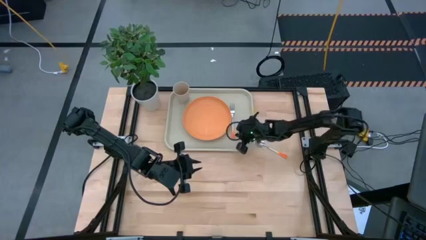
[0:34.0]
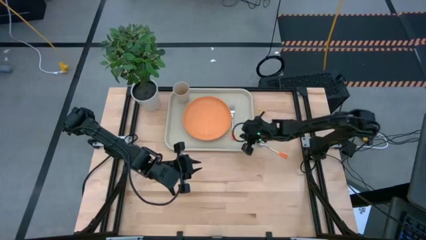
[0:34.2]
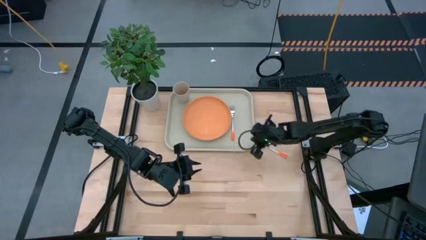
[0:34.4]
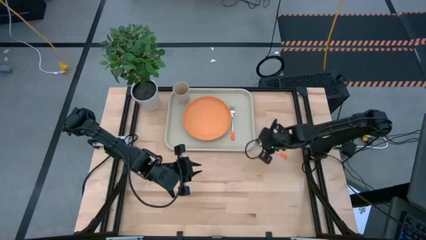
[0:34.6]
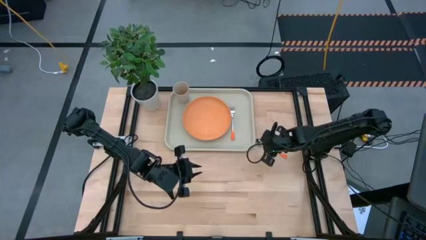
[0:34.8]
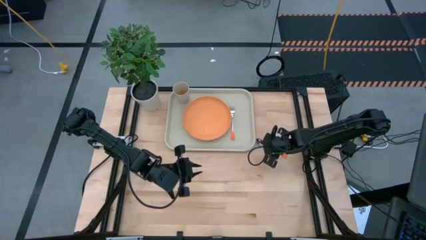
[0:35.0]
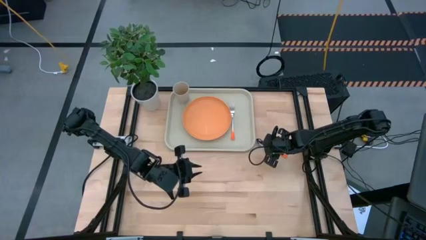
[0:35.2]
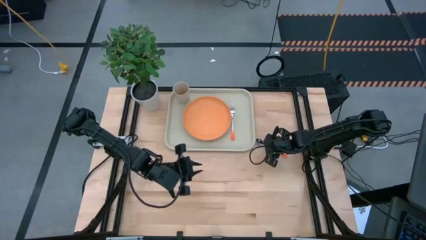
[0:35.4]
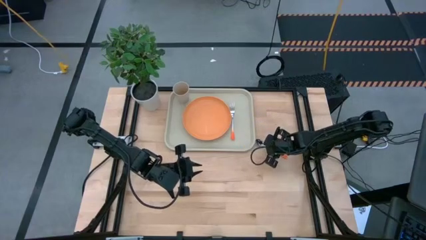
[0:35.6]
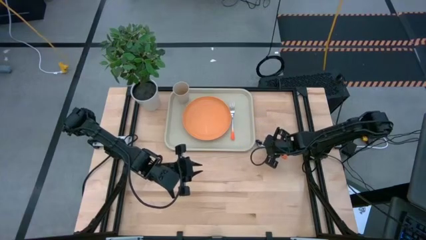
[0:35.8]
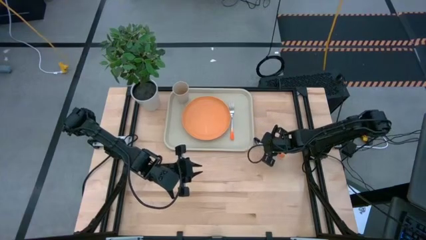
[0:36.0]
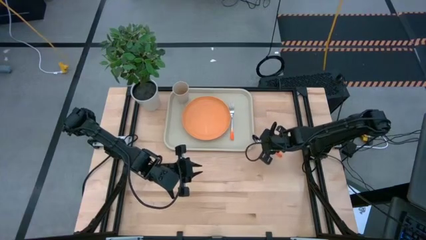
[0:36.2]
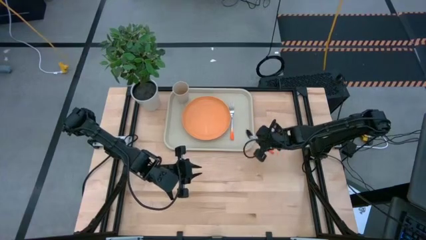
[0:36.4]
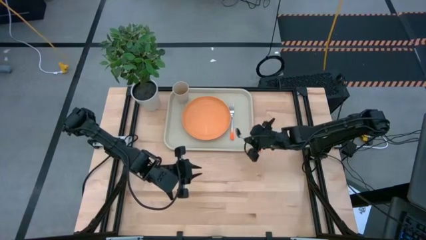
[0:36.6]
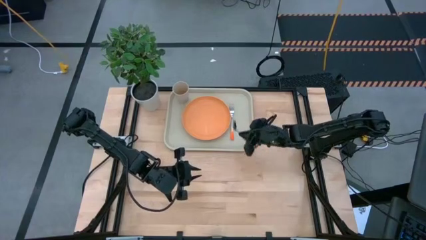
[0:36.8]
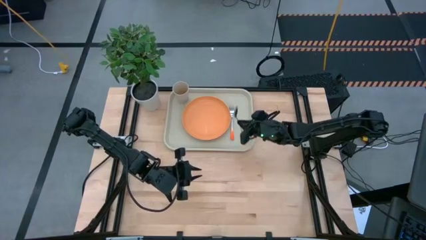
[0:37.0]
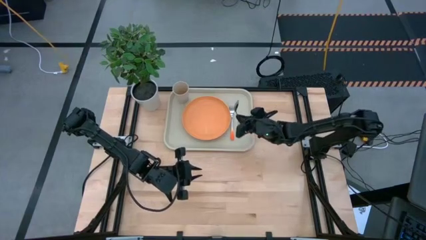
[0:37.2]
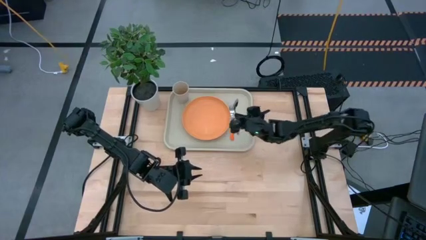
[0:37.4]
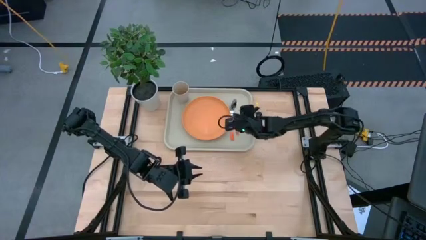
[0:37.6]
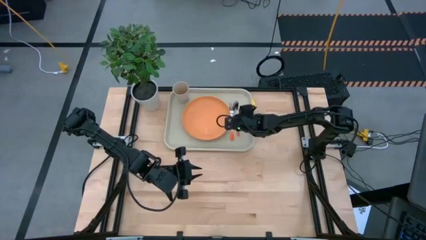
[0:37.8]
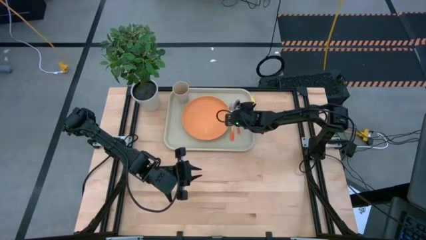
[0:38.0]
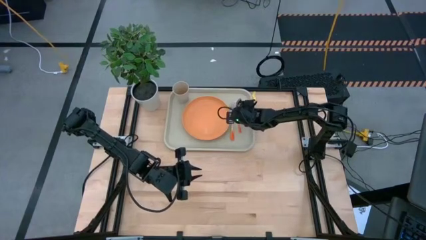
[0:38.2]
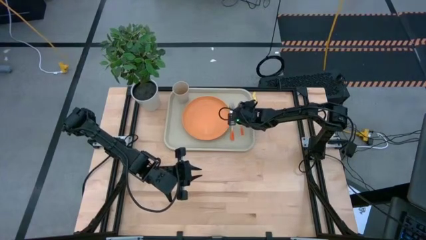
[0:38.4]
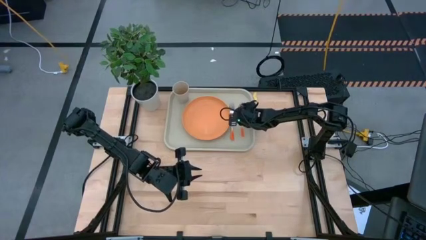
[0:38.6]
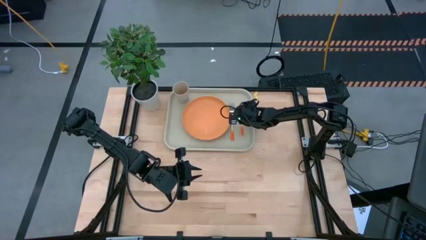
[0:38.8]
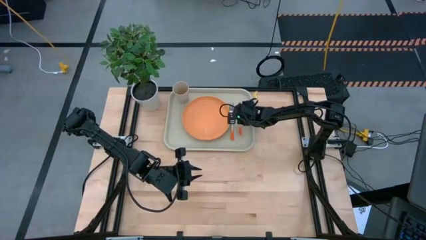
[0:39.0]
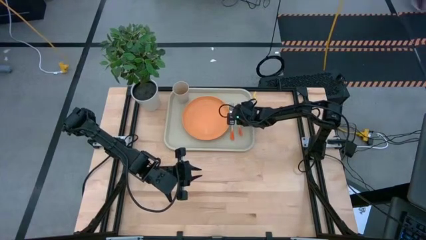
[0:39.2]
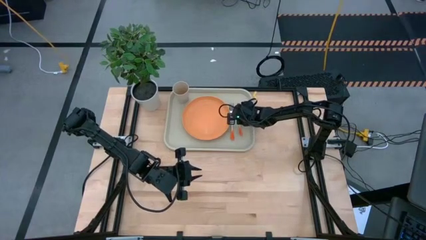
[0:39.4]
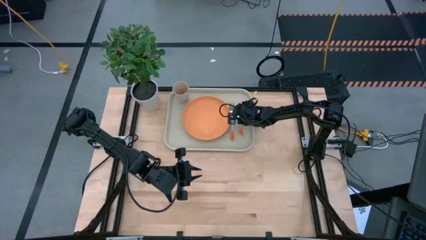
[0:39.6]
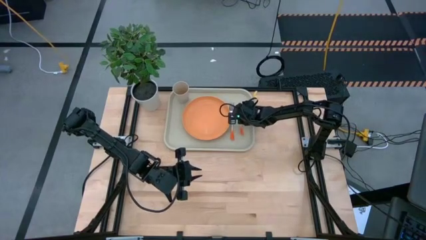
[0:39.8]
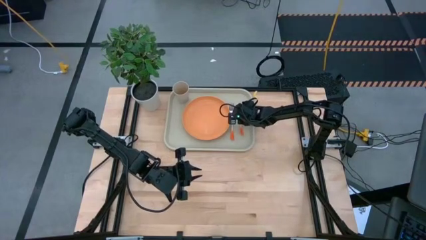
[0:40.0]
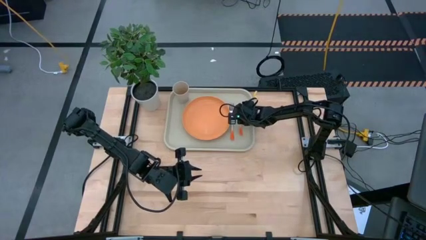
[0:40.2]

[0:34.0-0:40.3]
Task: Pick and place plate/cup/fork/spoon on tray
Put the orange spoon beside the orange fork on the brown tray

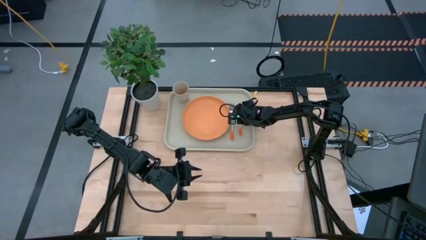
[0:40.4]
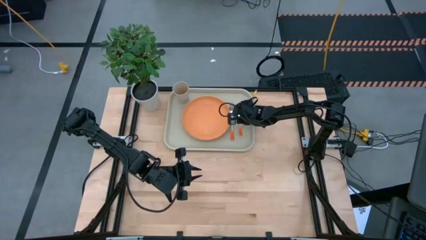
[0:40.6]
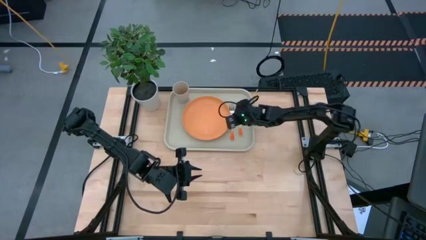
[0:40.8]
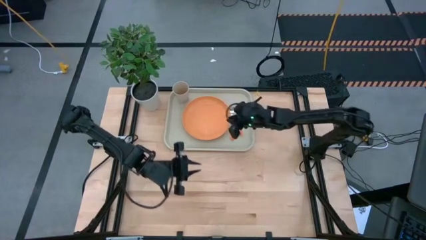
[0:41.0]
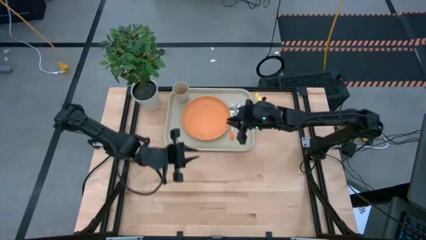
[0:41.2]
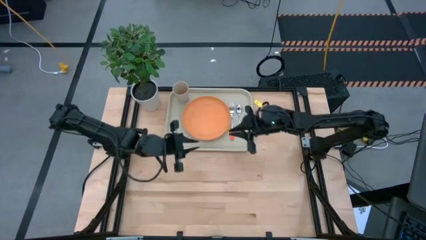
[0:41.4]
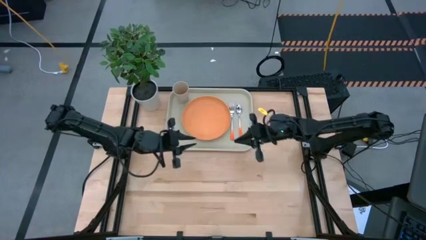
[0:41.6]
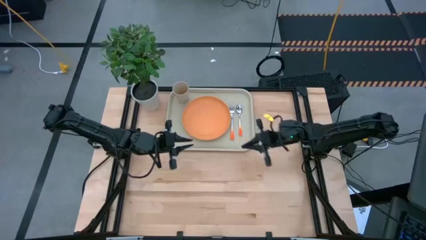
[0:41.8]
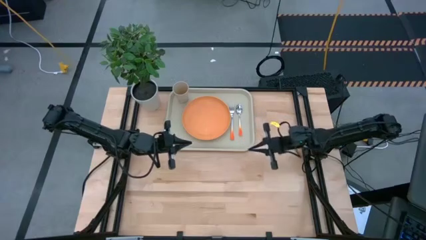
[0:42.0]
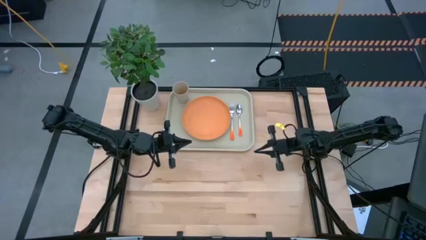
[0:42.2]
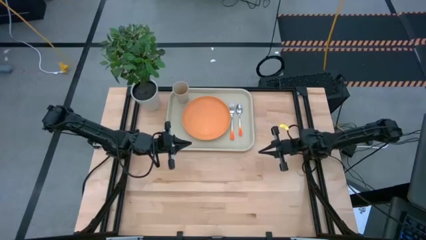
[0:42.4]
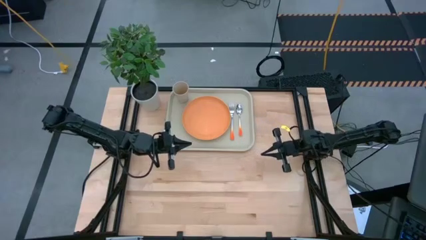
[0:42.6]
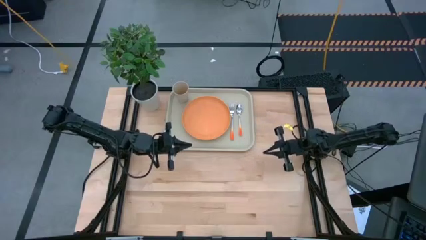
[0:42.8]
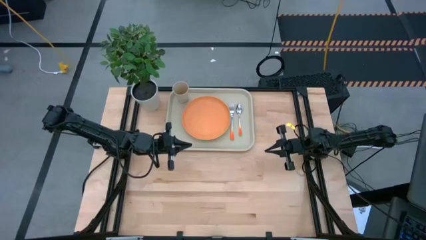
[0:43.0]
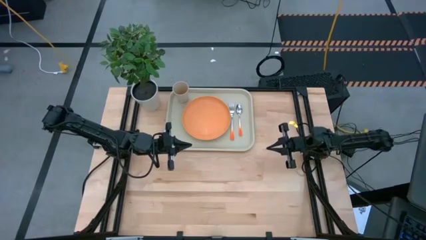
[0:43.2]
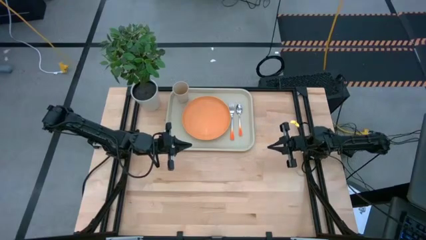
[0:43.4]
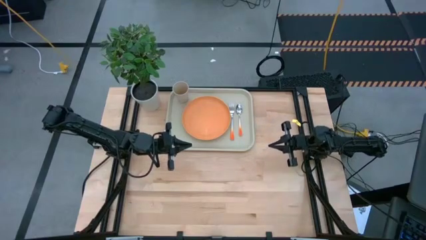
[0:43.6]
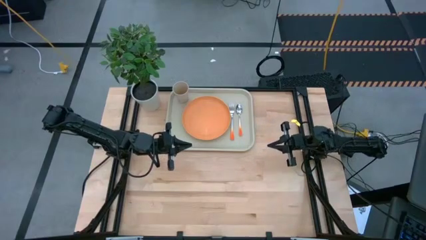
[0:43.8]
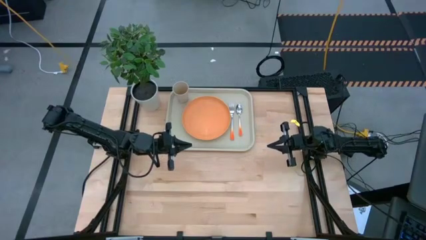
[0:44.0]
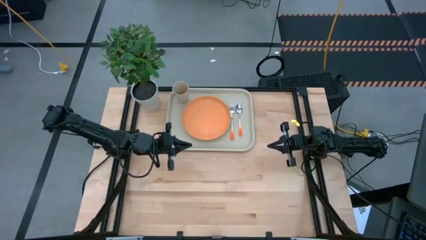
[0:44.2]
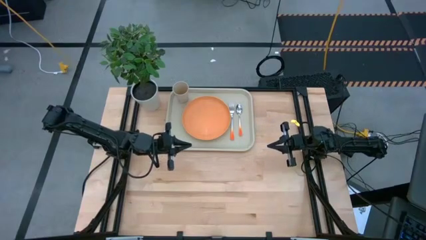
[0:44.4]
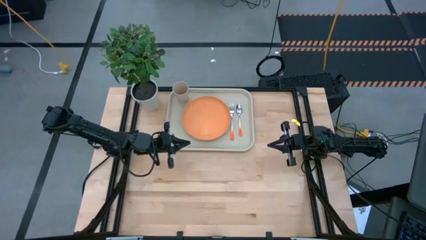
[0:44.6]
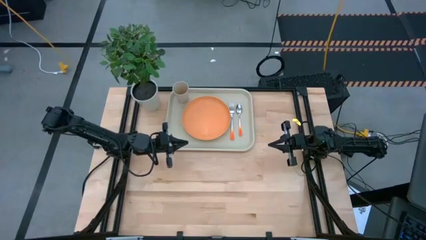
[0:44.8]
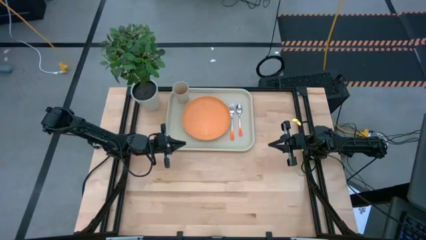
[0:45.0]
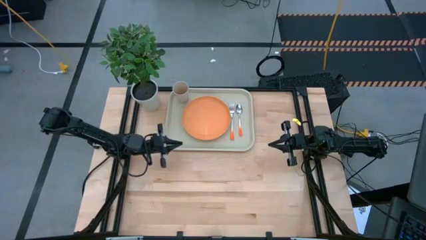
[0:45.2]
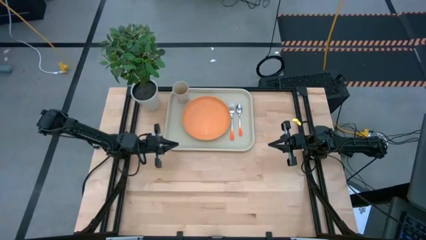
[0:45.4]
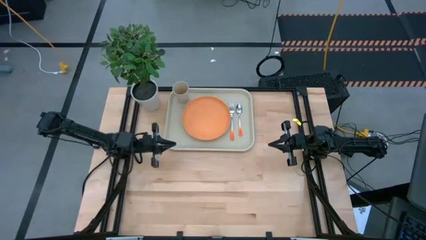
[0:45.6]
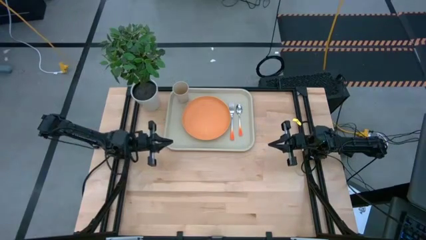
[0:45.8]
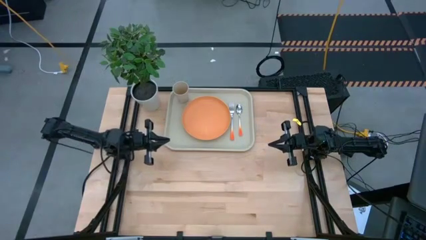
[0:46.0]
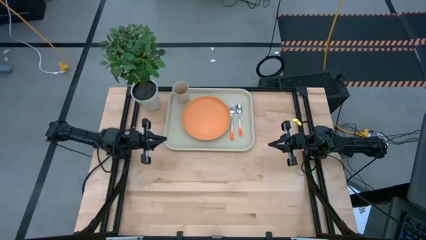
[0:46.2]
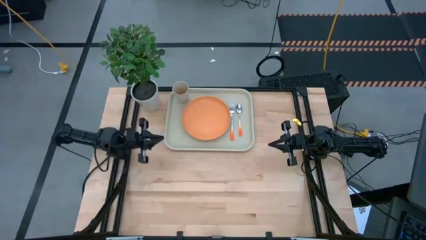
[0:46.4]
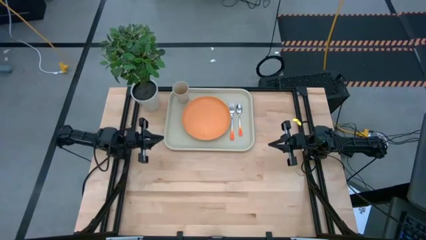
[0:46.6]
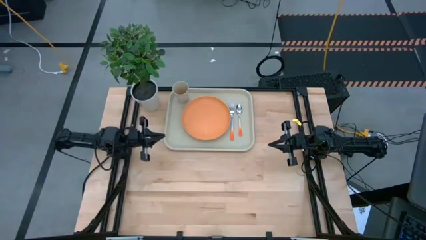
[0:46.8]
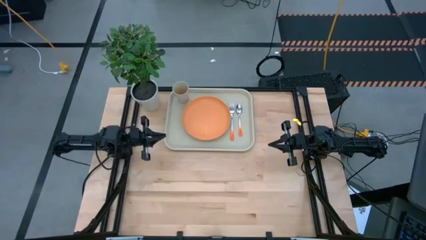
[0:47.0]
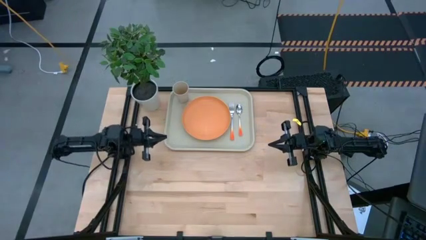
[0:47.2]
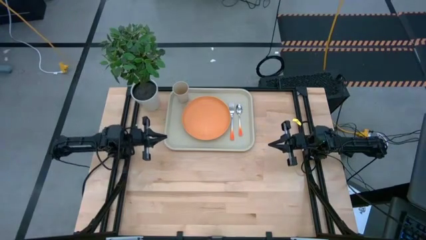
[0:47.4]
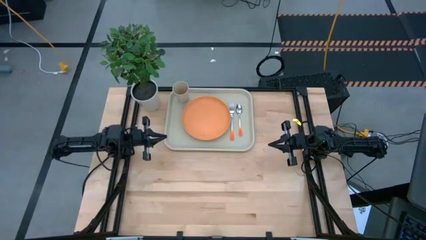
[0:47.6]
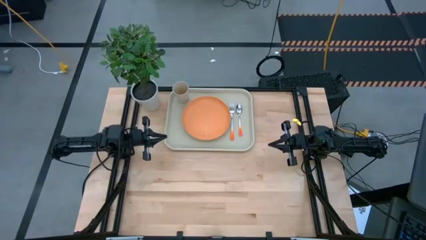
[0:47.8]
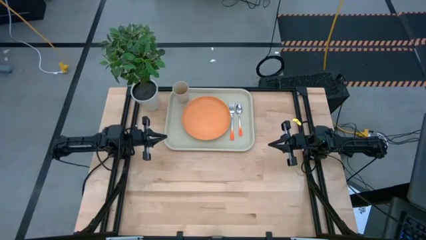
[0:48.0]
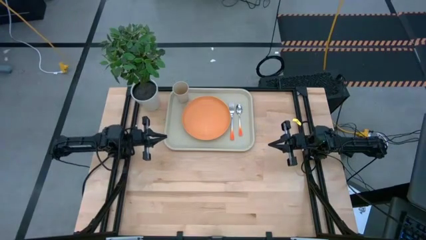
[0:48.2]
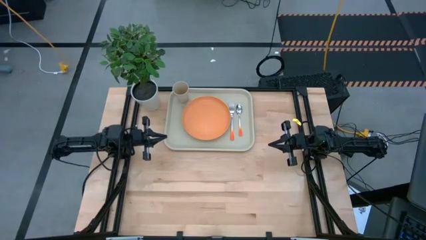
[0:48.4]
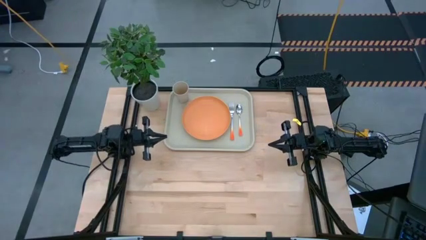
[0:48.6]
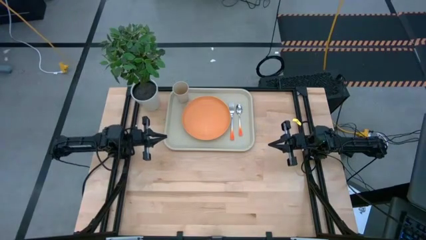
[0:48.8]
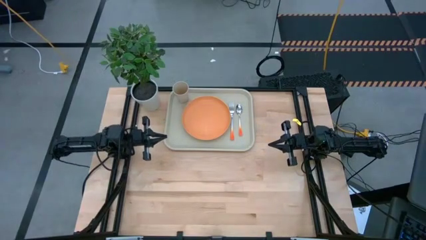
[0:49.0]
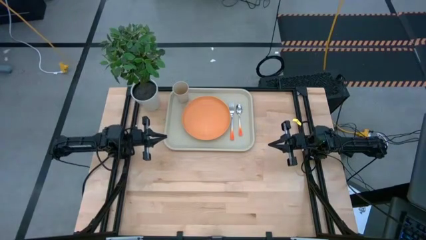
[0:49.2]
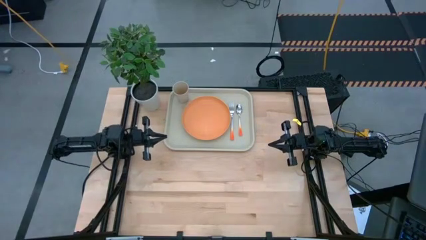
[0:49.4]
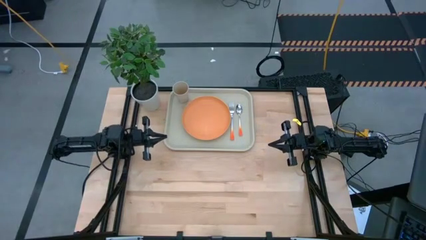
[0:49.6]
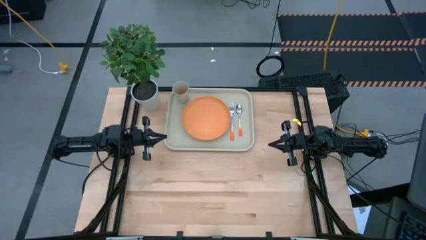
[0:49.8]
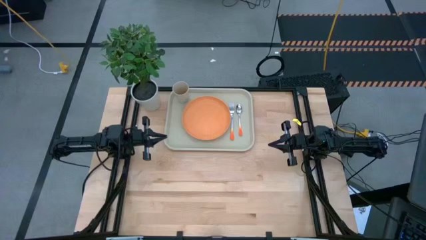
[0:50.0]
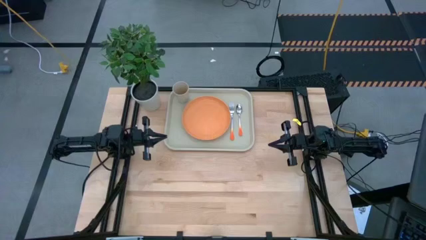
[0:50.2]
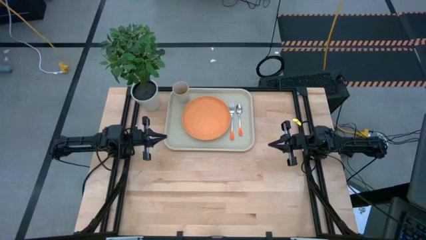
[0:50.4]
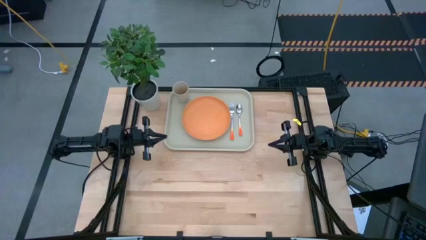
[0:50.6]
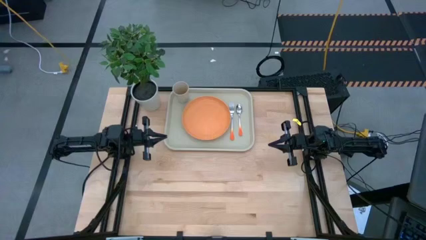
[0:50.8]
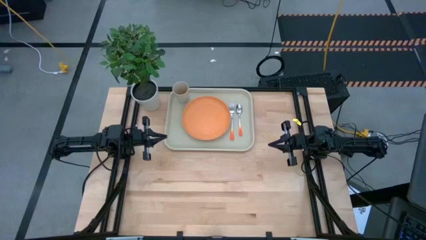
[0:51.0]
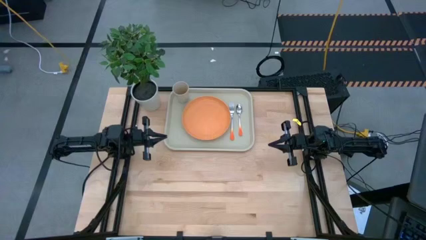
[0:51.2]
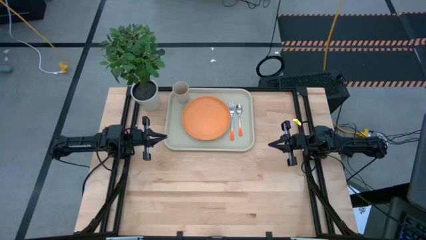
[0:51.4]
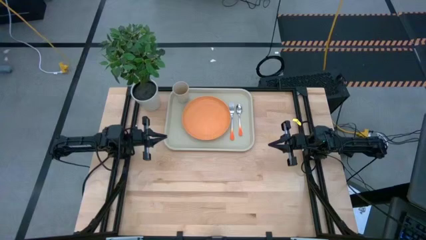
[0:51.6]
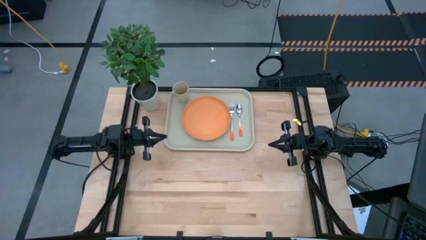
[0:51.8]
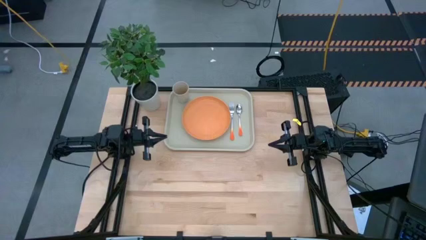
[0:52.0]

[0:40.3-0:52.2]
Return to Home Position
